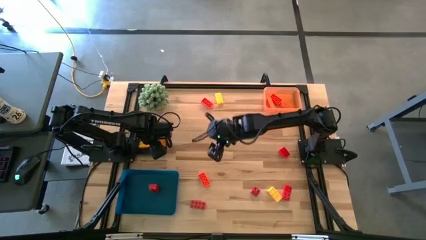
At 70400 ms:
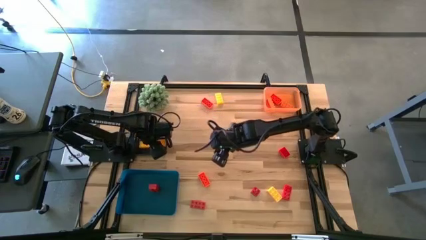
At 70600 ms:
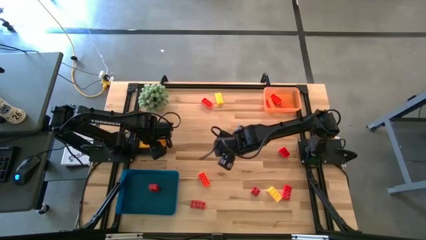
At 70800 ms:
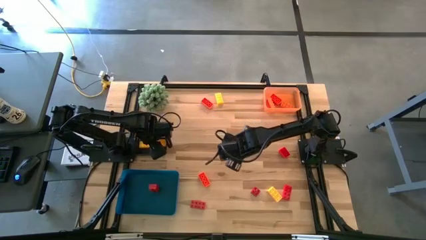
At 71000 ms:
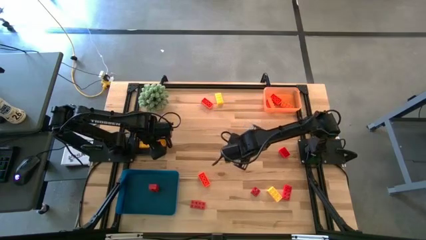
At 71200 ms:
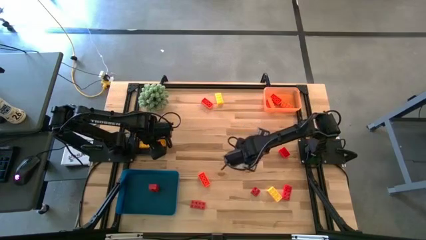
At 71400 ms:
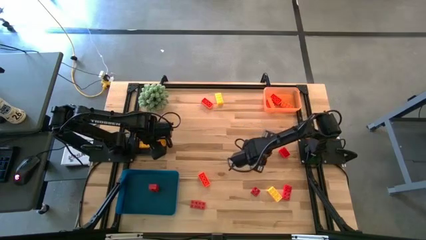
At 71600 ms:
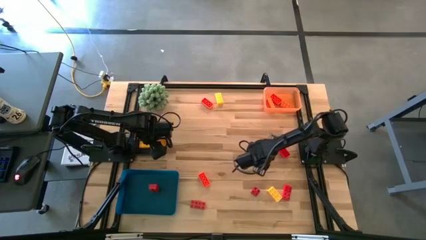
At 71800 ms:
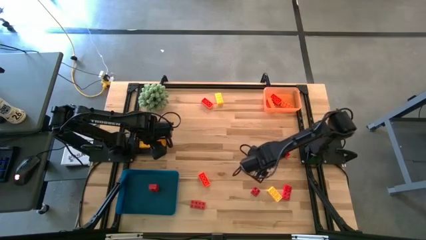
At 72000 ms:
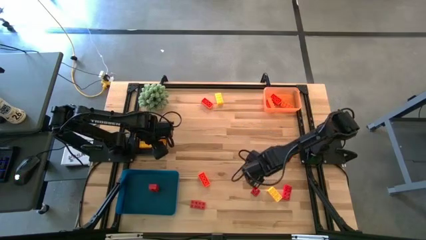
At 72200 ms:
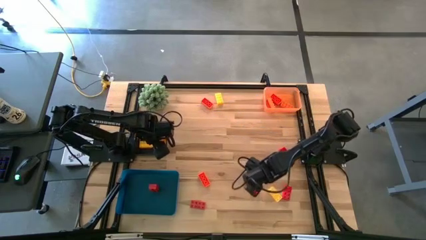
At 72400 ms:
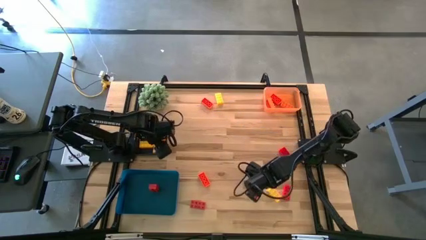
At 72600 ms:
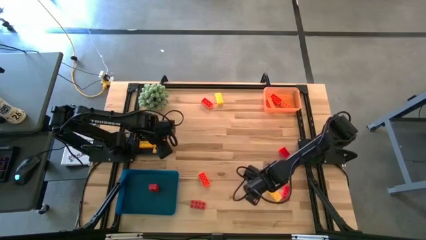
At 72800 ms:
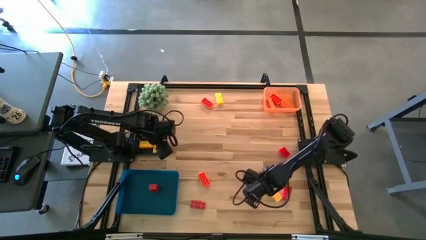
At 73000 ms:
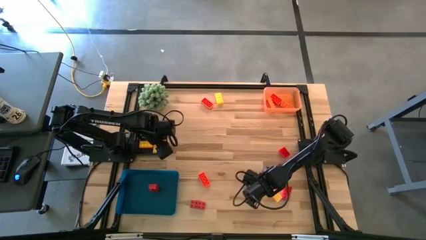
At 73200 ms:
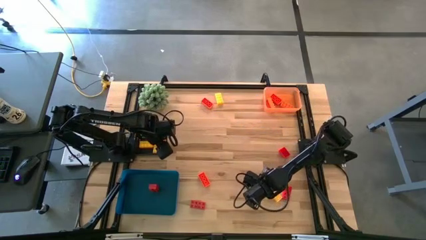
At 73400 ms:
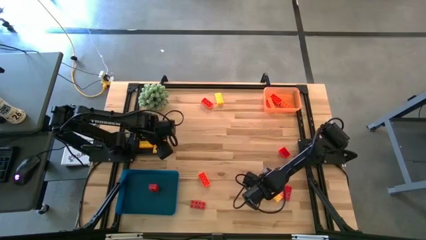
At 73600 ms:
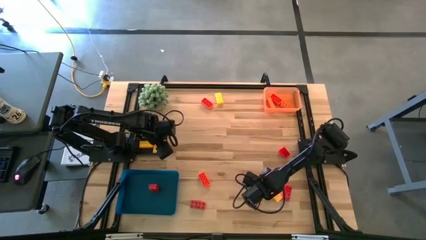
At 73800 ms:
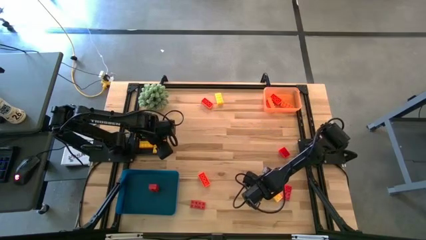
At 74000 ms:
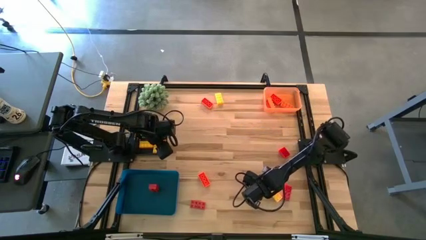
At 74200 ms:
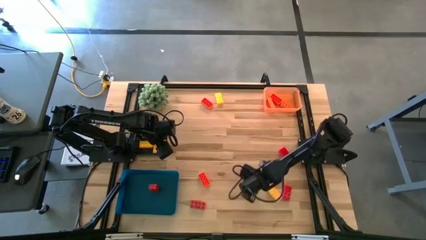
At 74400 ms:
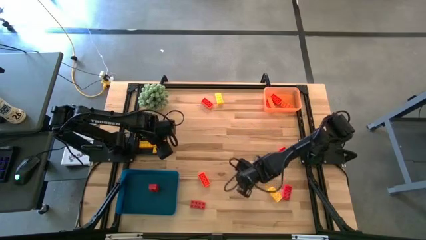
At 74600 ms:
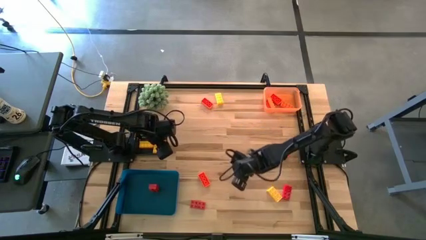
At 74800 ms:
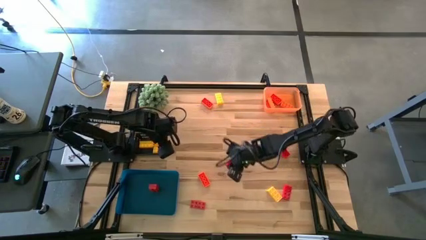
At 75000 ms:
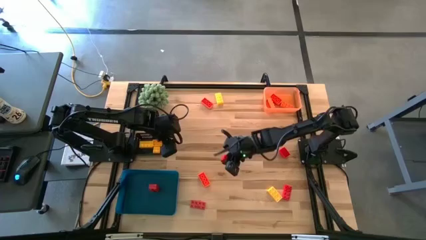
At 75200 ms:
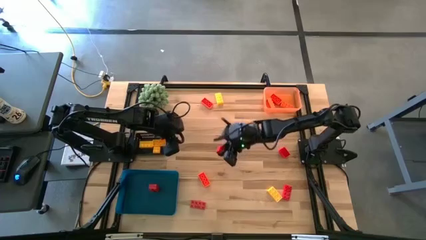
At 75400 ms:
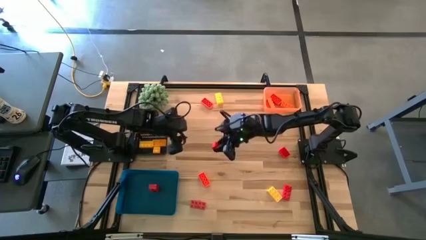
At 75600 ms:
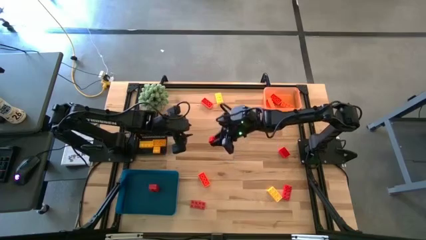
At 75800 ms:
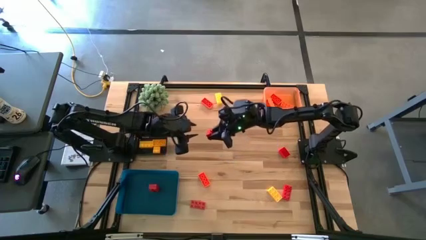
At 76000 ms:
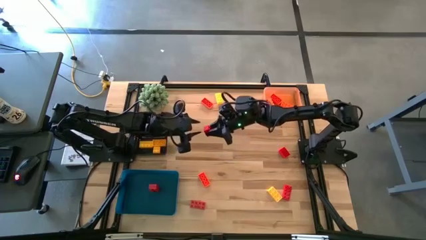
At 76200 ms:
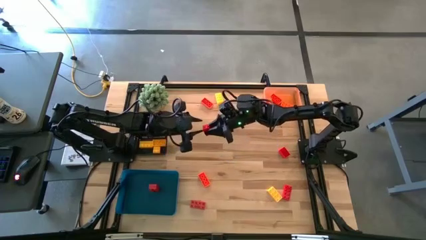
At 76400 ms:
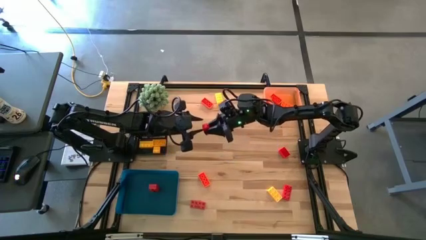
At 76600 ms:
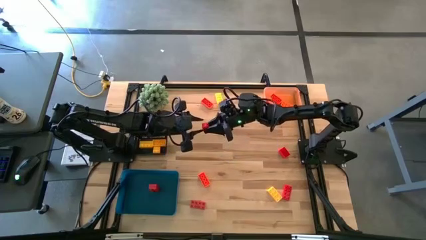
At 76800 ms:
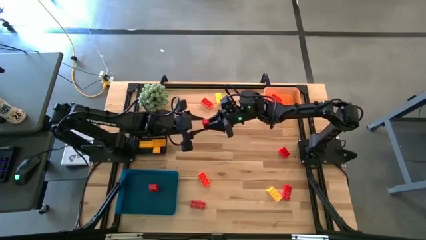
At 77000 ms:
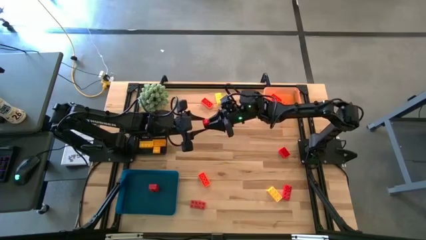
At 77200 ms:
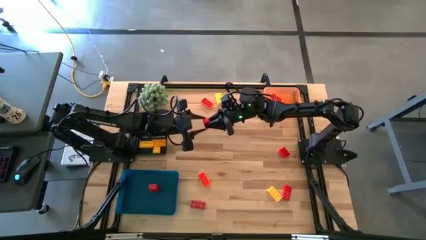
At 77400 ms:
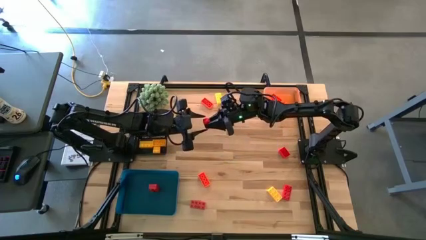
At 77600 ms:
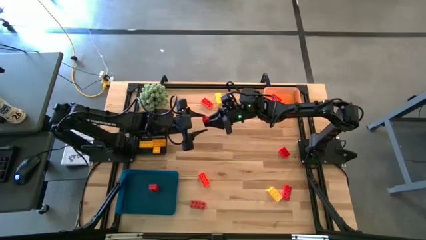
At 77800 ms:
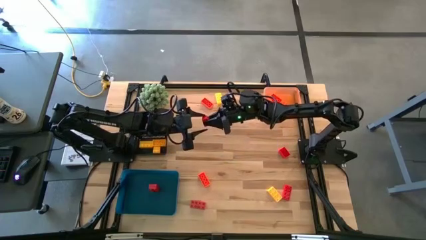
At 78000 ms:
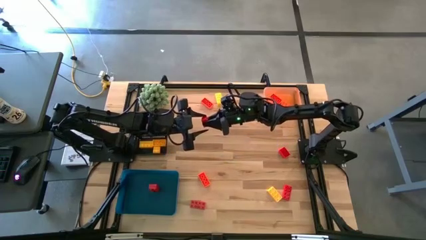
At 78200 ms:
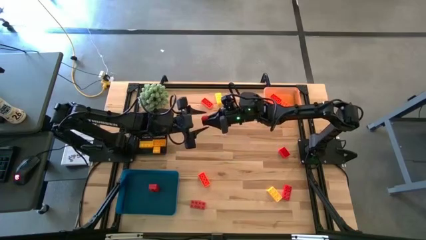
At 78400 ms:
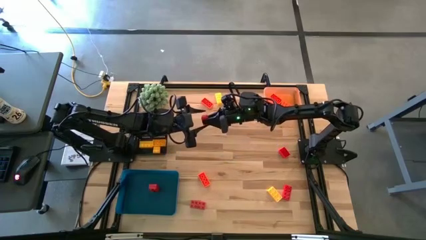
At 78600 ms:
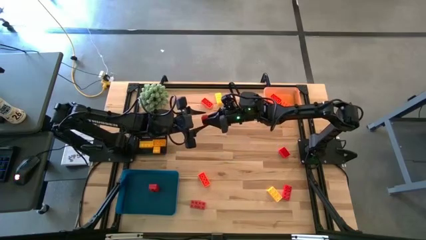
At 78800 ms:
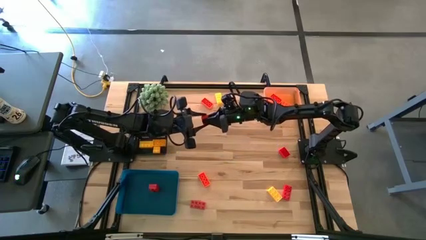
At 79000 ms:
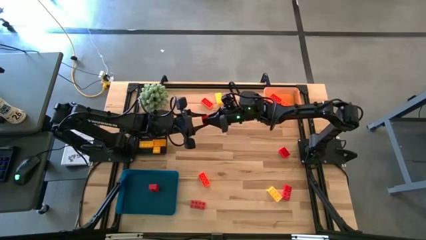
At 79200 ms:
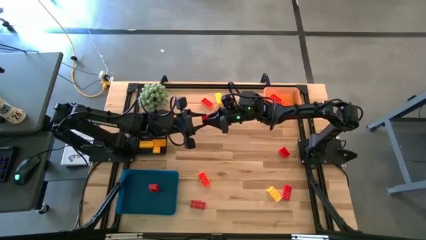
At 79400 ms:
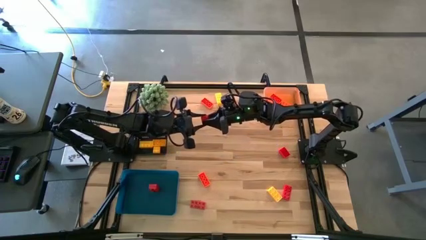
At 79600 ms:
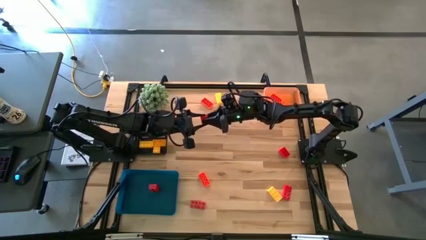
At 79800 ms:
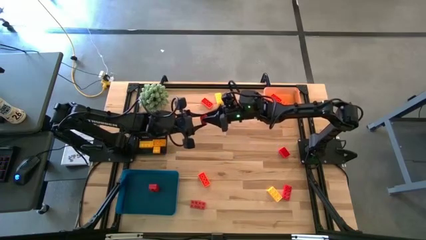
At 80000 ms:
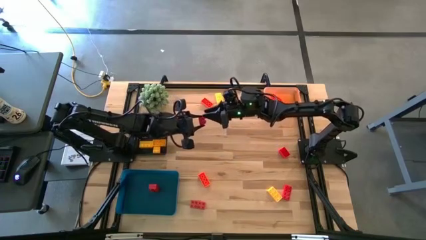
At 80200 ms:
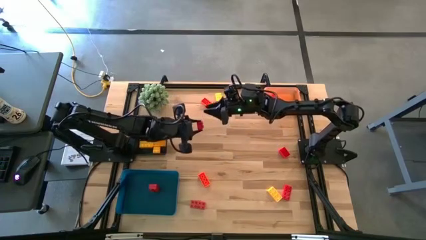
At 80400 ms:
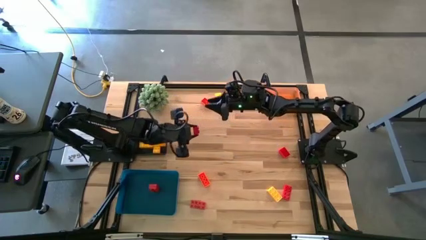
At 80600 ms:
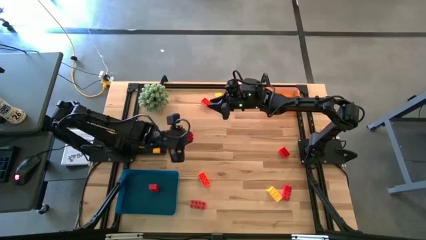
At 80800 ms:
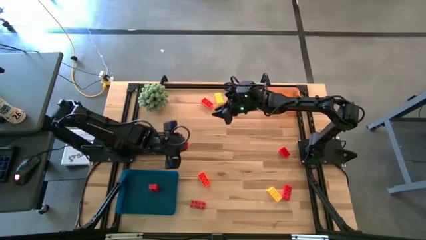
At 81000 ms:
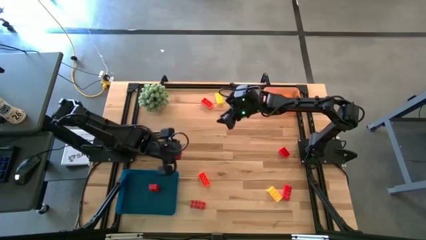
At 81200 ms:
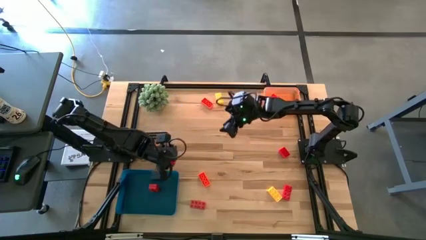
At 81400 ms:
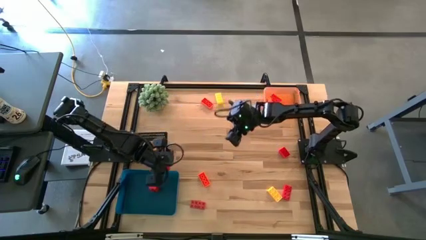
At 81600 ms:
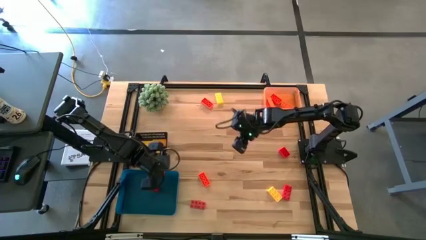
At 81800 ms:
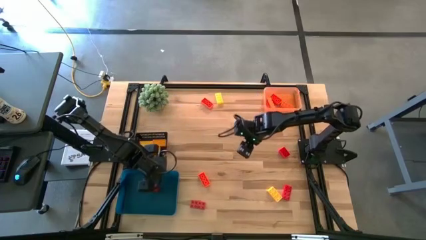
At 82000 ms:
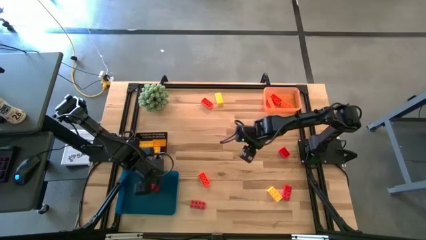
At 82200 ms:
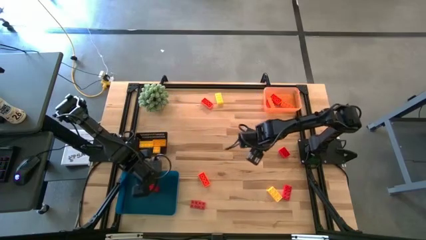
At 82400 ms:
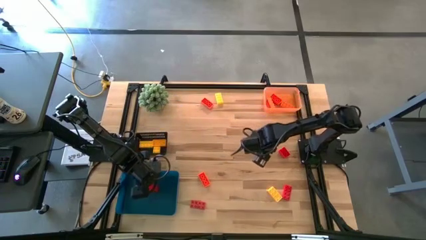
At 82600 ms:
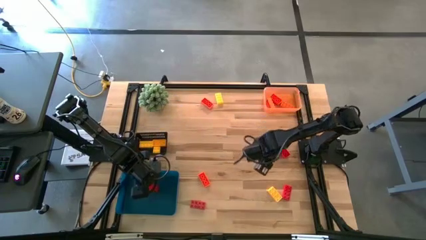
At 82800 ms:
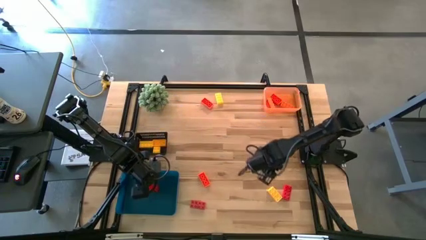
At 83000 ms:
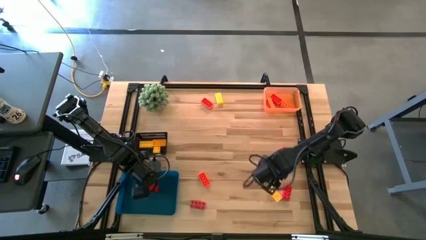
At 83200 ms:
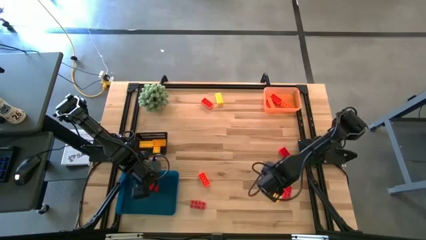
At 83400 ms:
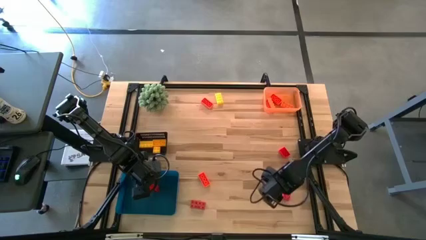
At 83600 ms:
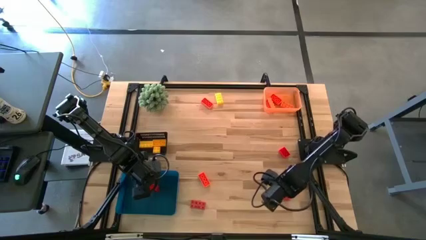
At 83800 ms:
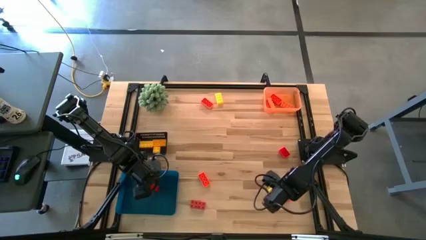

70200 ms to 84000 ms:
Task: Sort & place blocks by color
Put the red game piece into the blue bin
